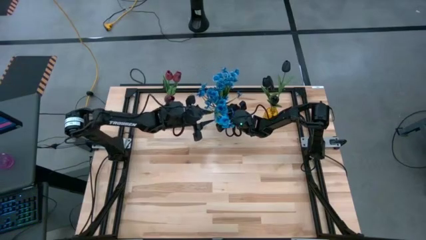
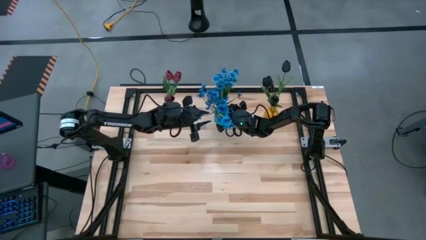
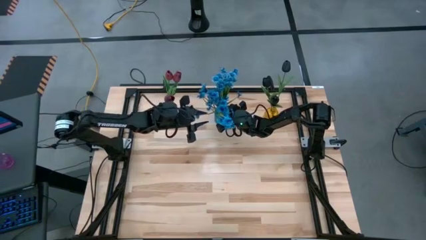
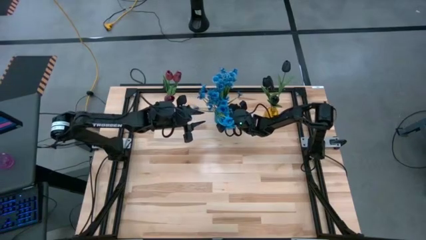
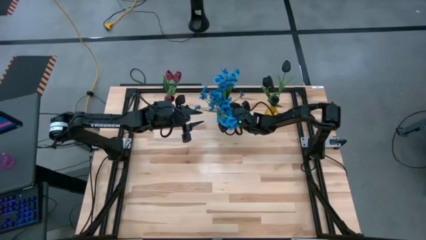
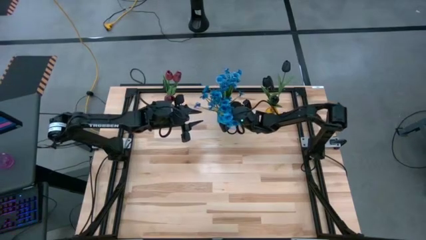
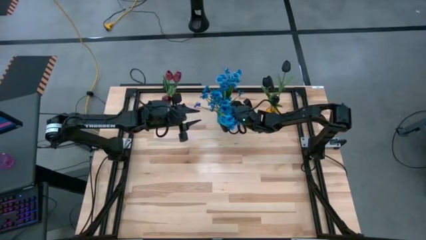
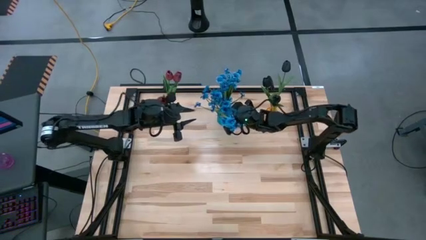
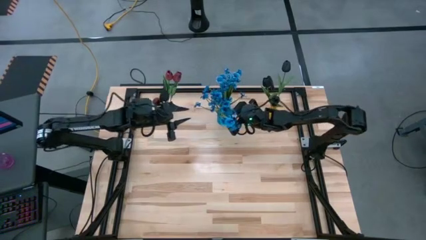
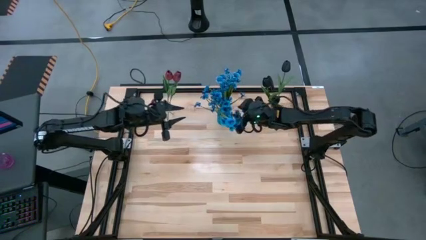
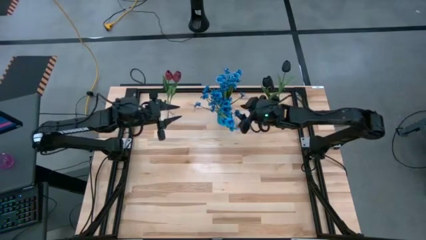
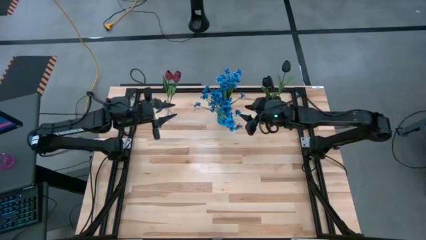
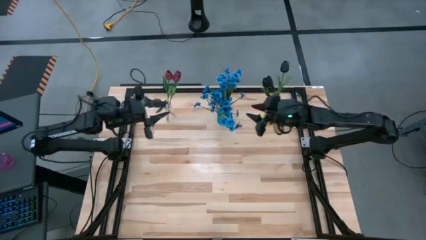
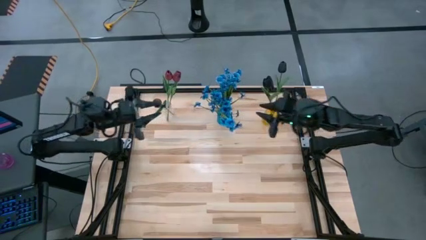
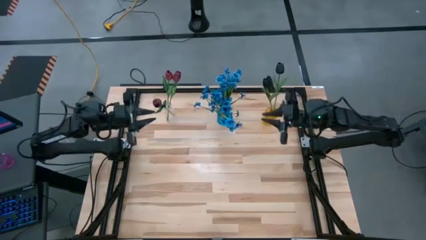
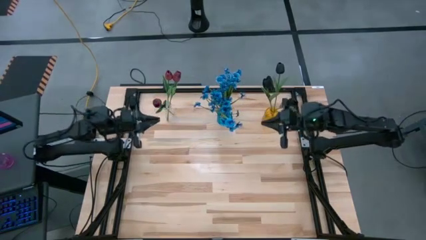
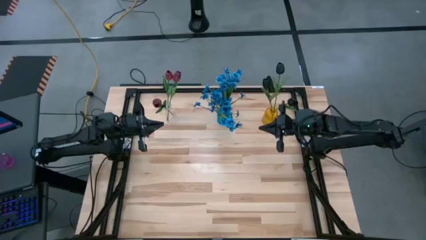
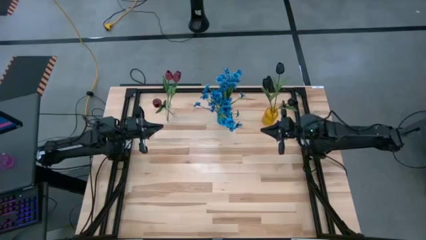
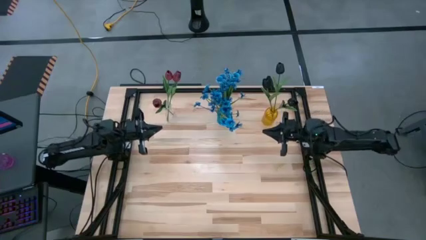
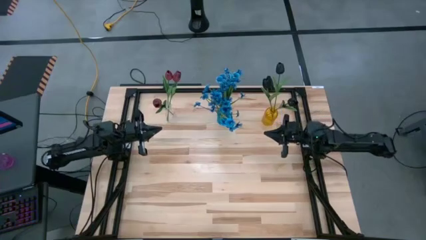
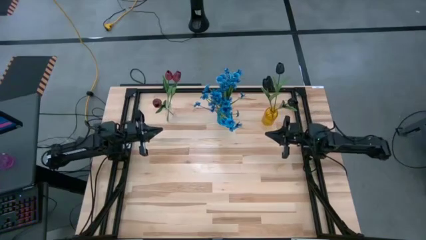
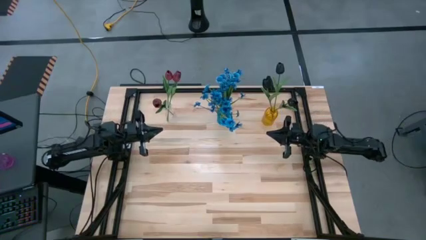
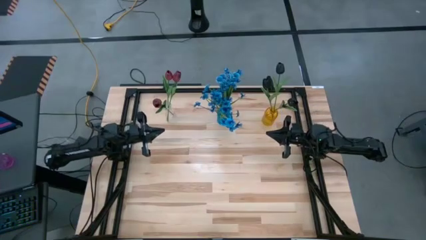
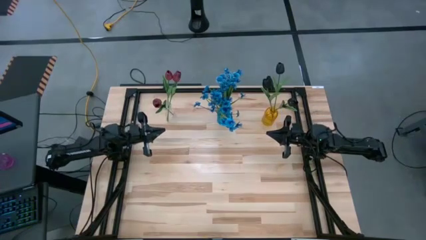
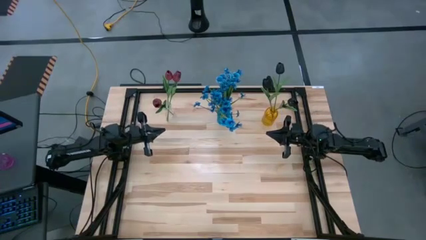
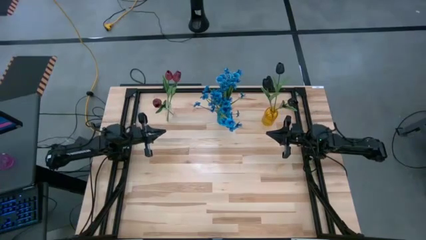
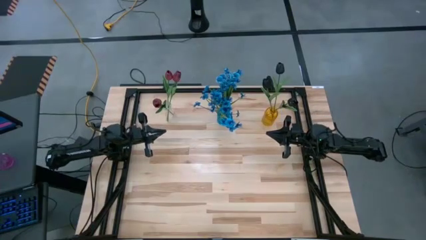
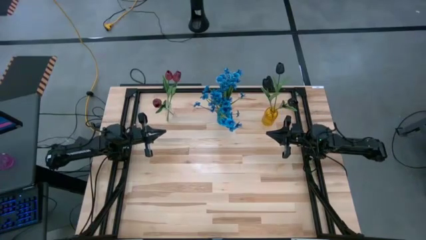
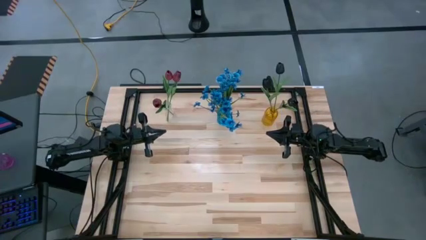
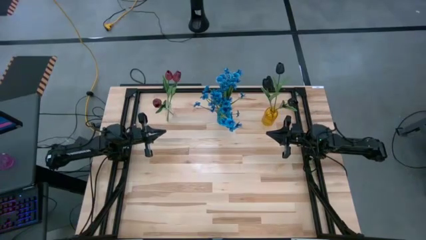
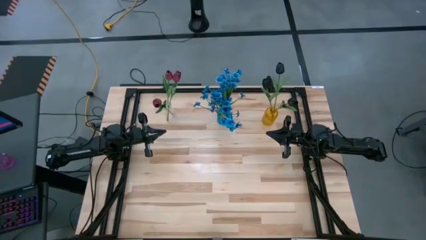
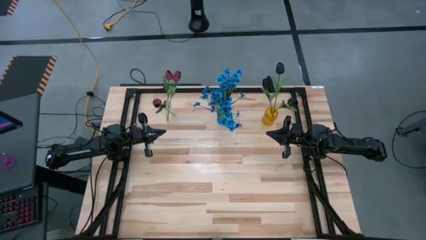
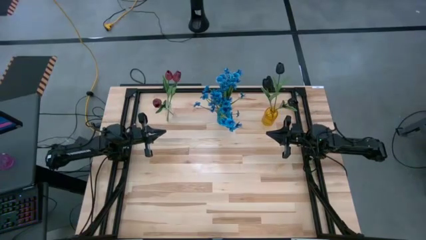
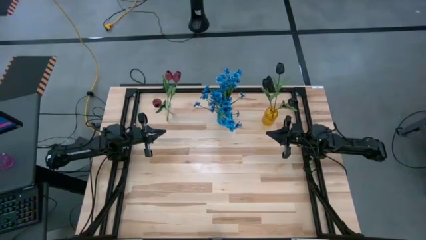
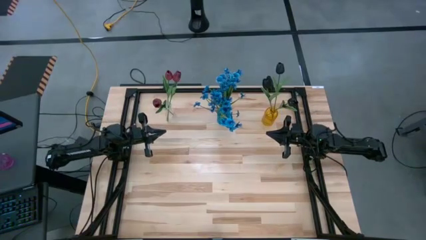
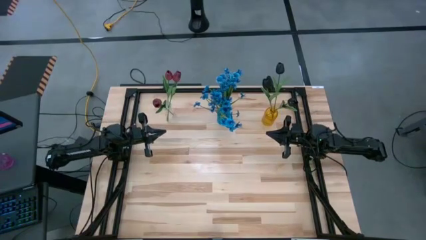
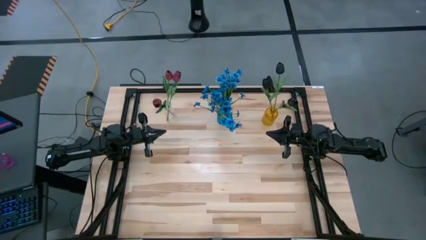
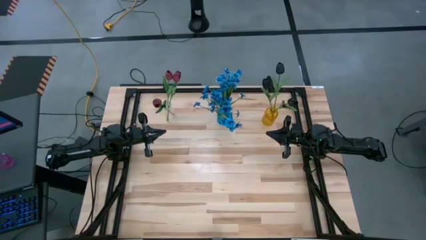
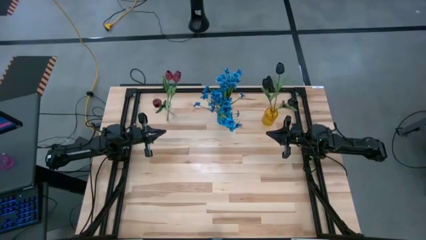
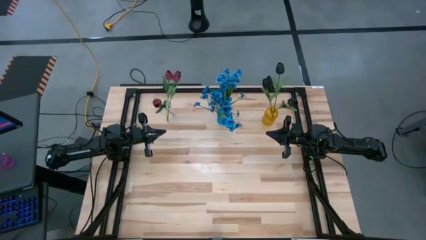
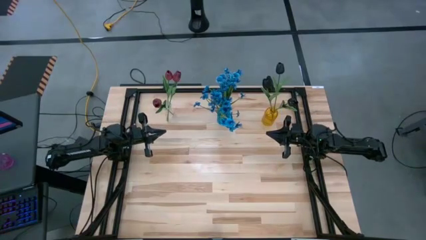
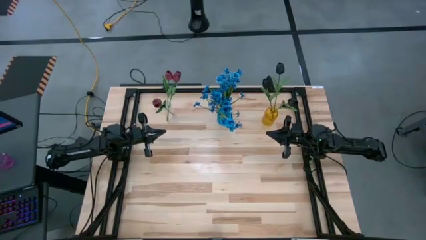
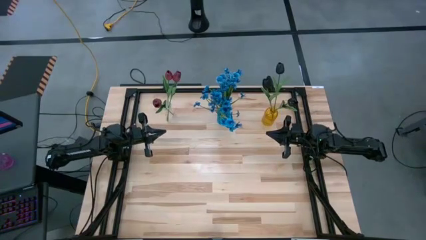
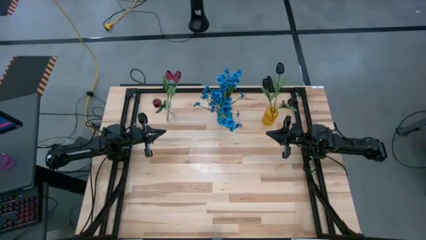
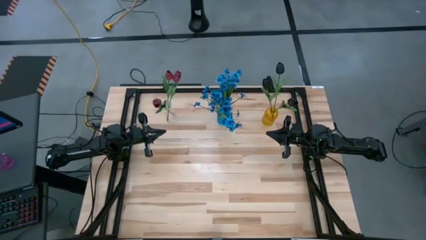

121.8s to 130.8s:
Task: Sort flowers into vase by color
Return to Home Position

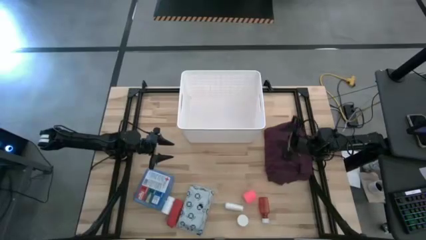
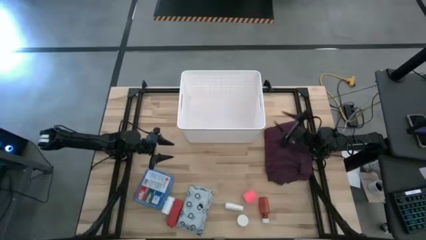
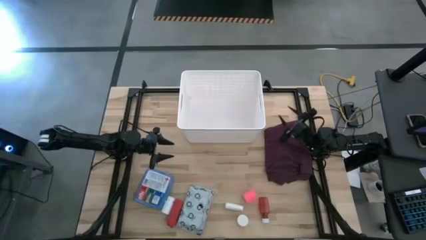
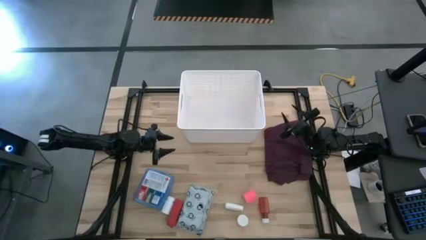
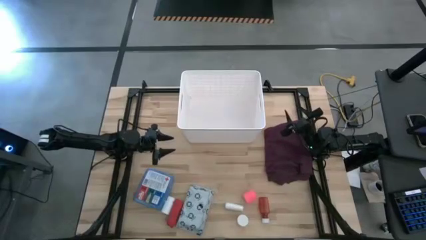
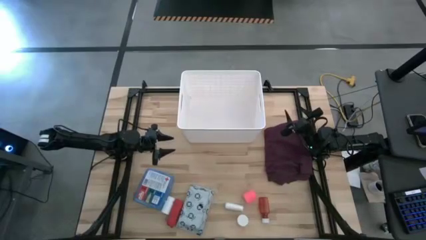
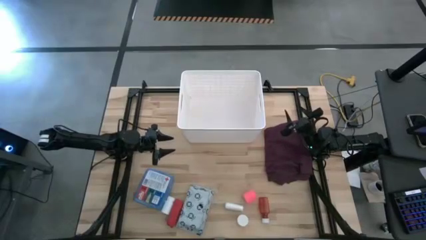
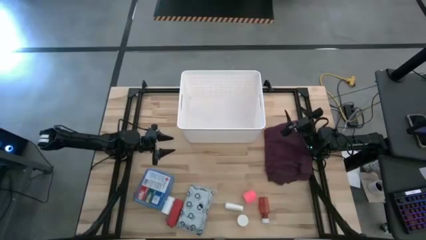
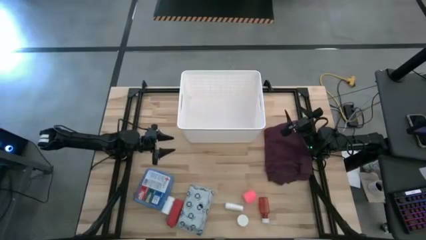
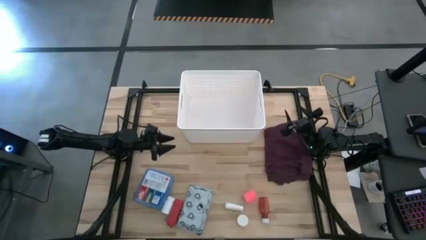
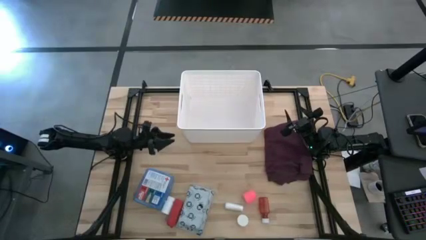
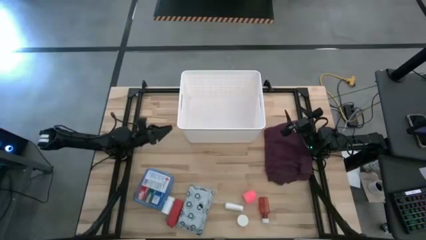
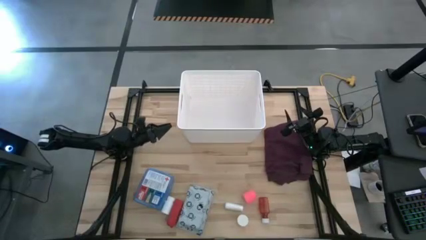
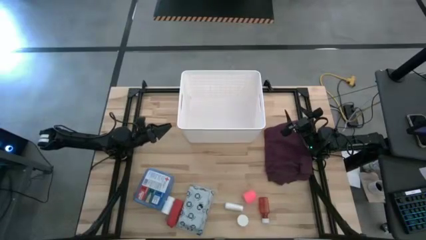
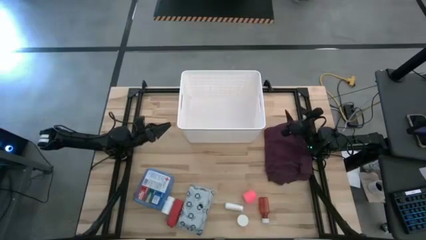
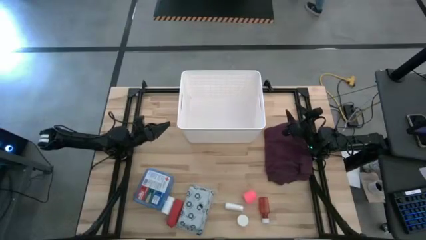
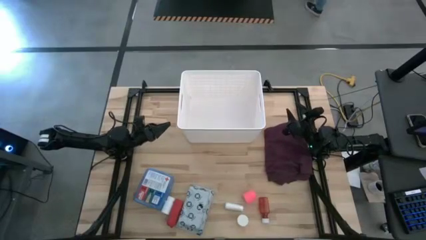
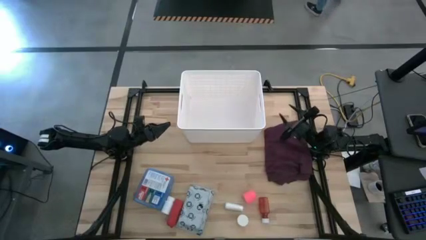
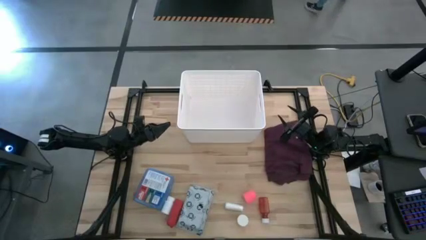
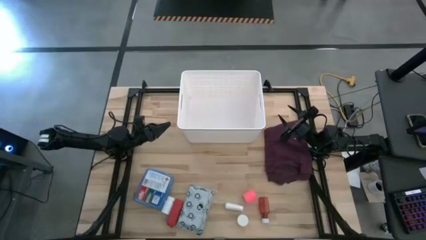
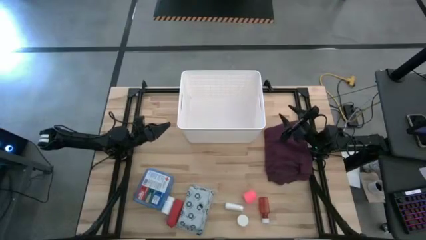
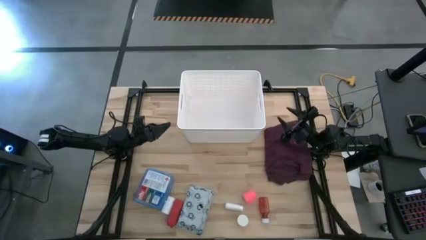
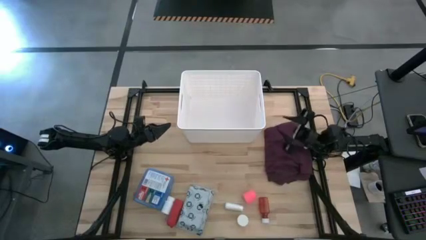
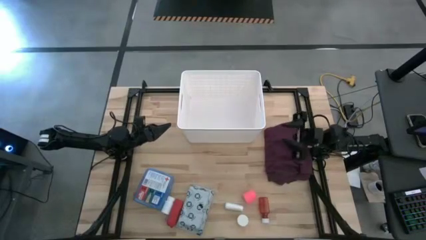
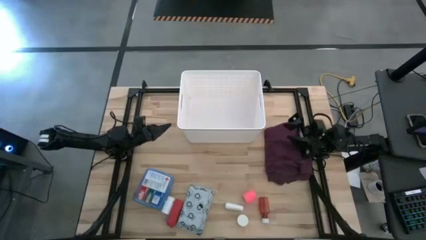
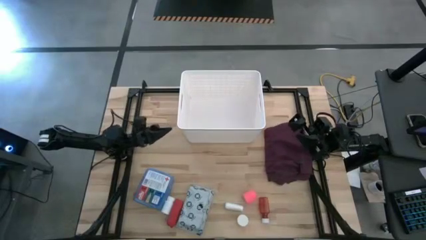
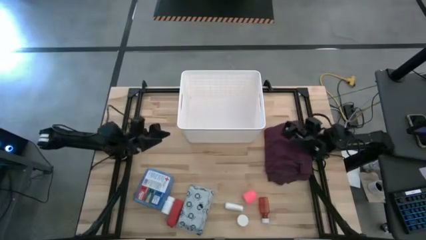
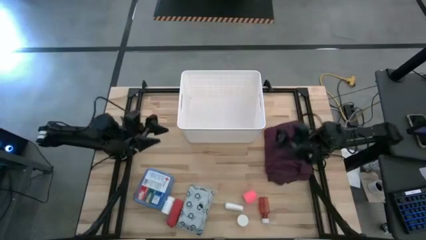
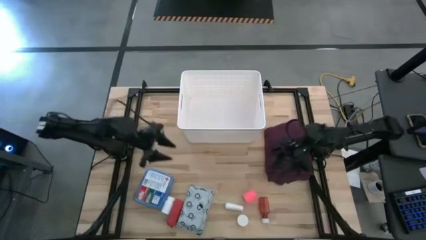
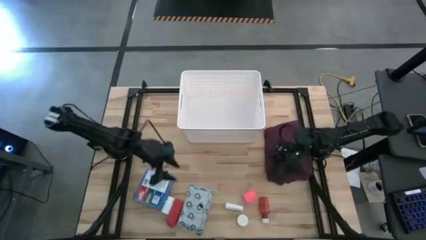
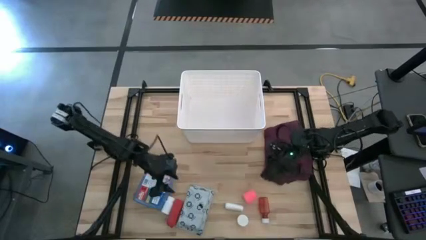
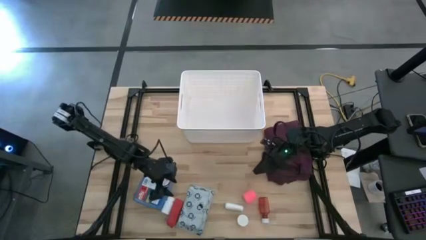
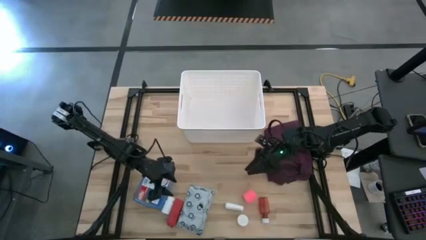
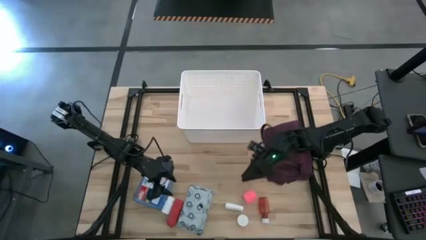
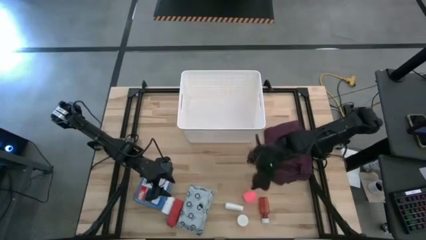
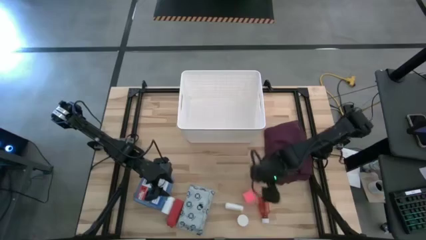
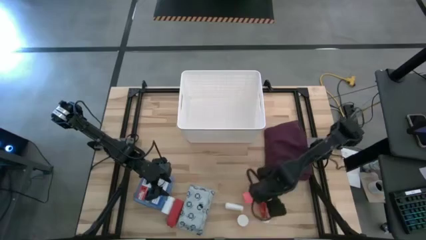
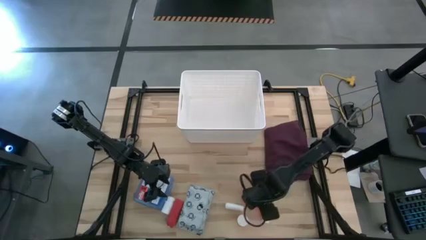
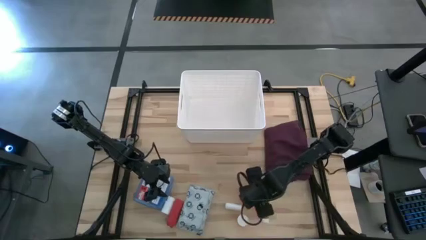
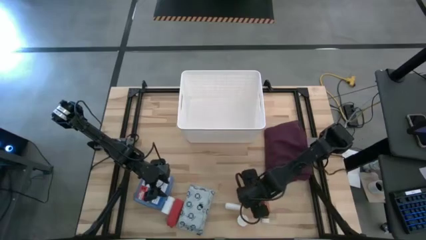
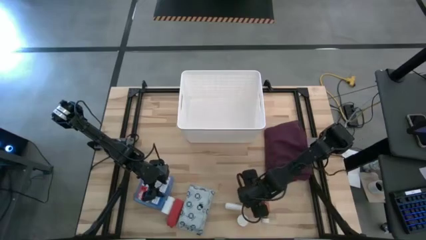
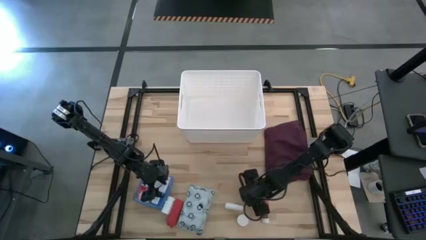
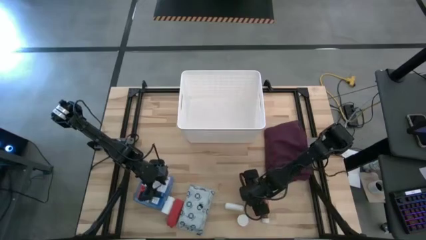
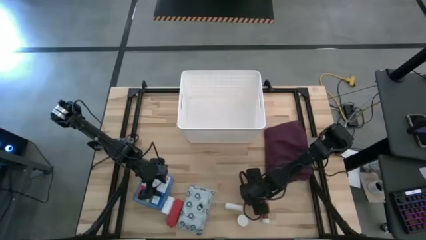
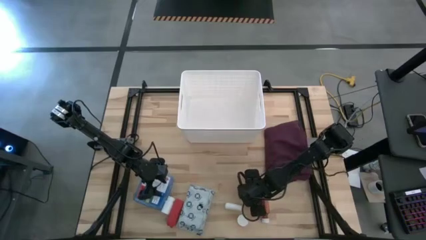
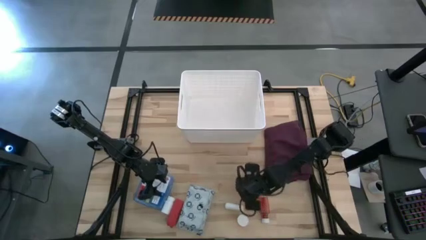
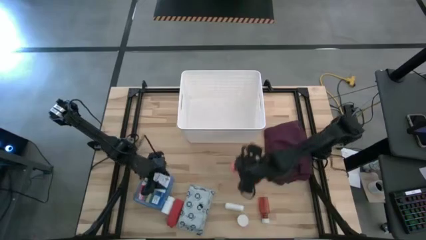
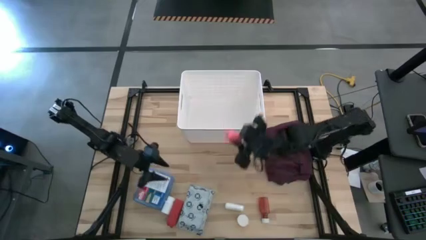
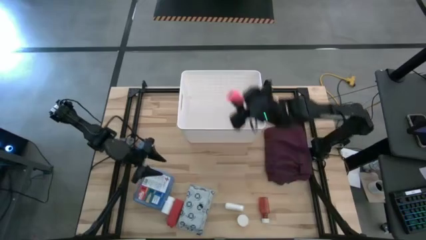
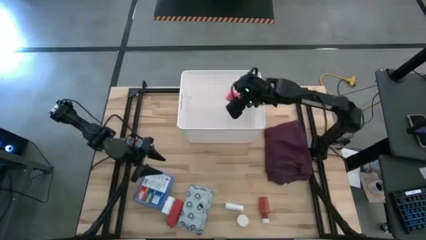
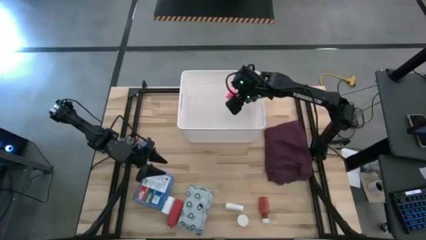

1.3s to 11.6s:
Task: Pick & place medical supplies in basket/bin
Put the small pink bandage into the white bin
